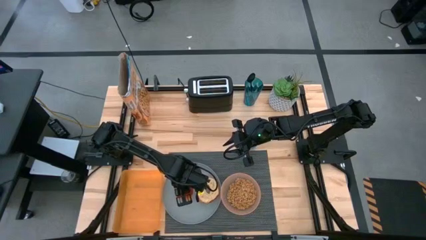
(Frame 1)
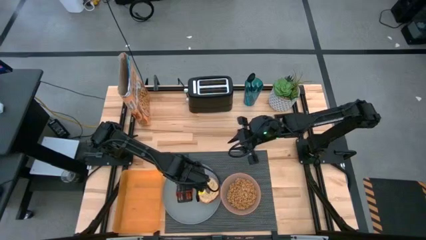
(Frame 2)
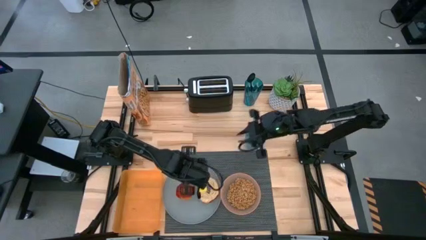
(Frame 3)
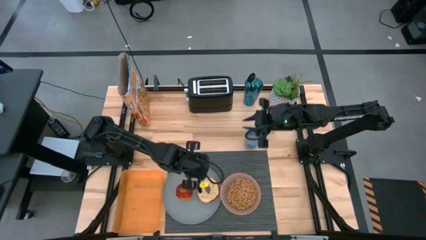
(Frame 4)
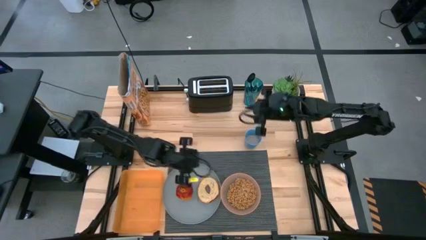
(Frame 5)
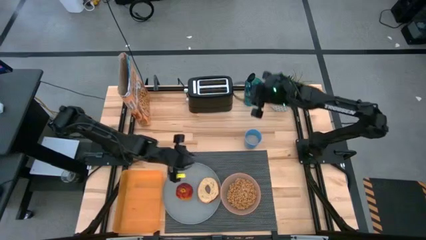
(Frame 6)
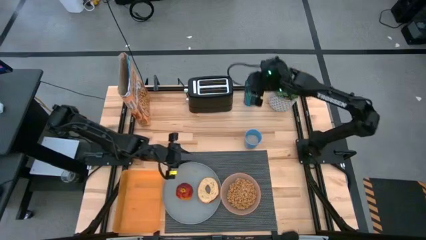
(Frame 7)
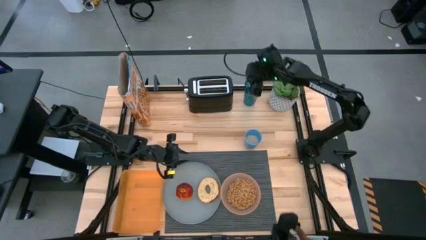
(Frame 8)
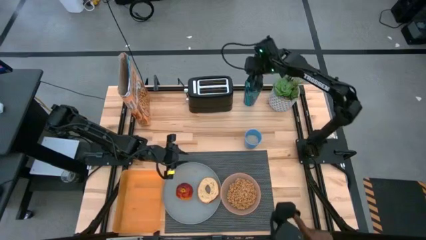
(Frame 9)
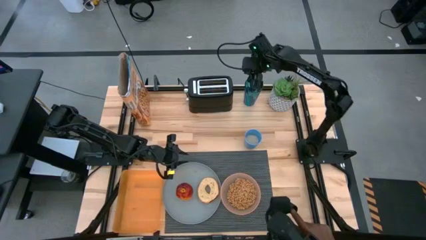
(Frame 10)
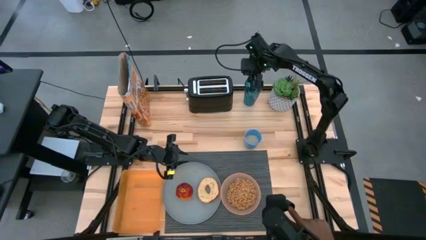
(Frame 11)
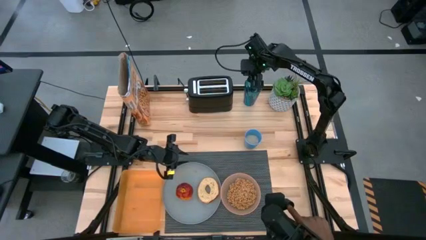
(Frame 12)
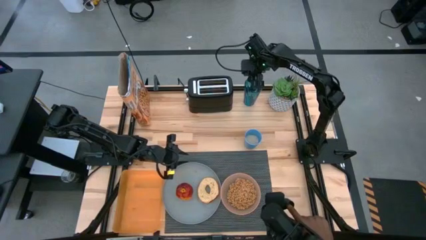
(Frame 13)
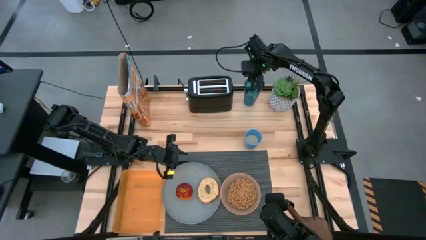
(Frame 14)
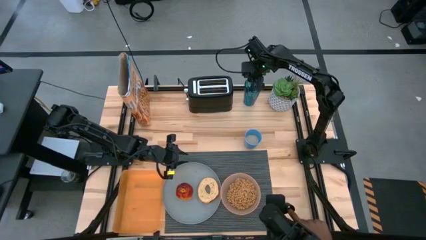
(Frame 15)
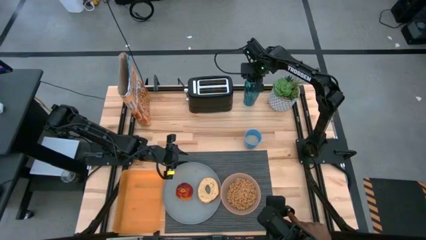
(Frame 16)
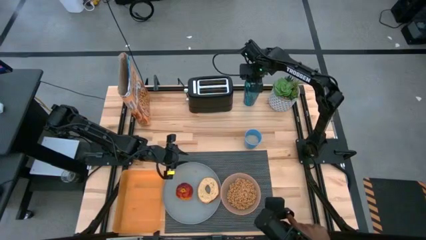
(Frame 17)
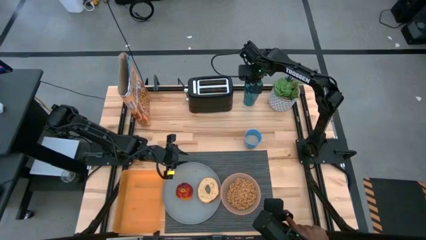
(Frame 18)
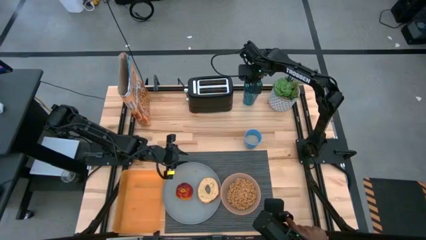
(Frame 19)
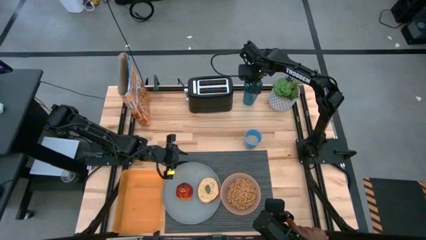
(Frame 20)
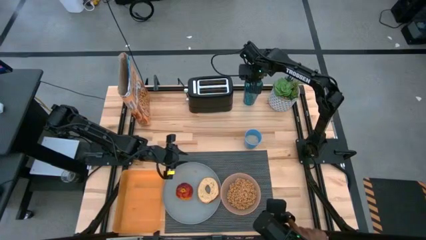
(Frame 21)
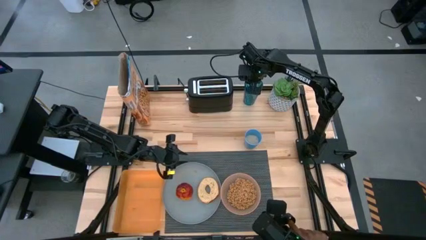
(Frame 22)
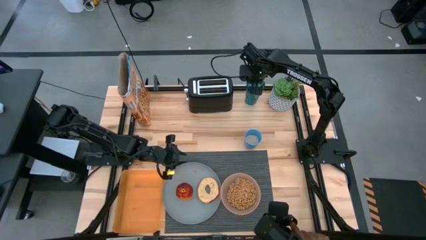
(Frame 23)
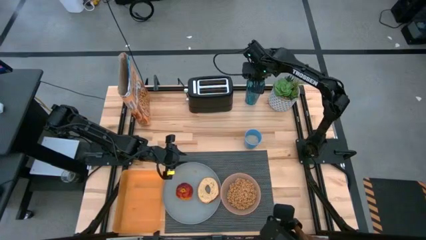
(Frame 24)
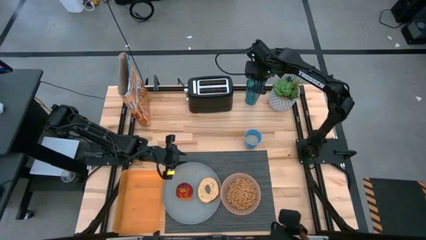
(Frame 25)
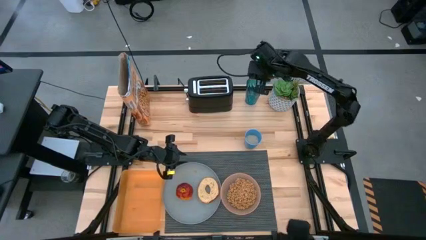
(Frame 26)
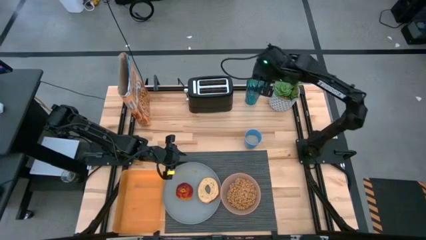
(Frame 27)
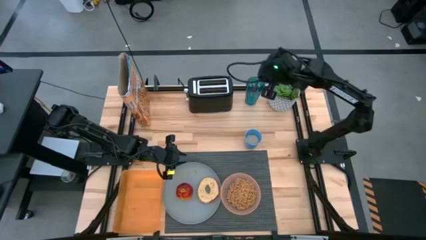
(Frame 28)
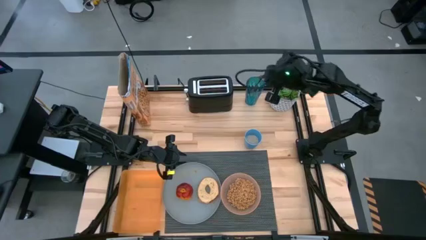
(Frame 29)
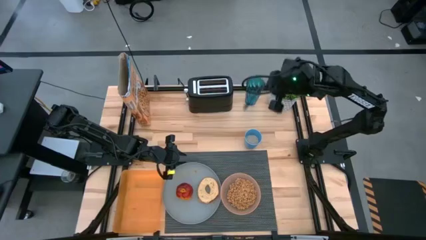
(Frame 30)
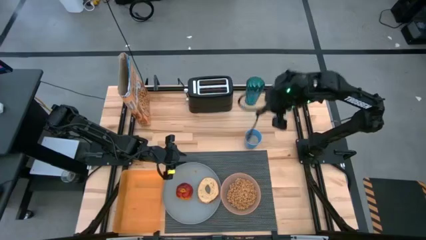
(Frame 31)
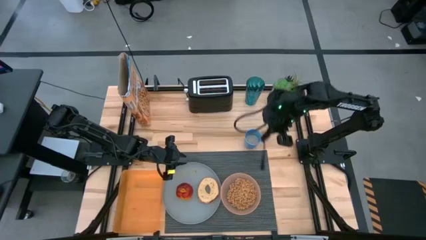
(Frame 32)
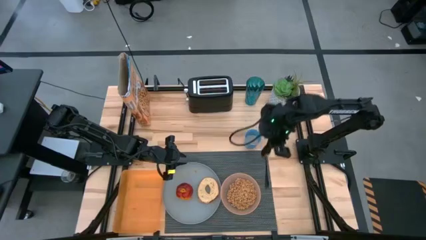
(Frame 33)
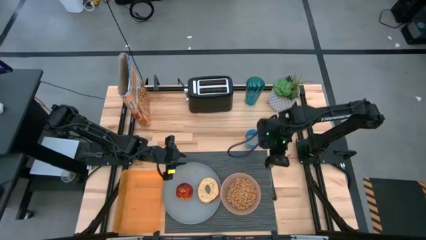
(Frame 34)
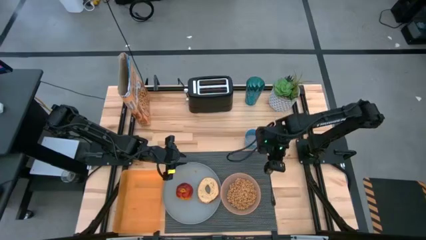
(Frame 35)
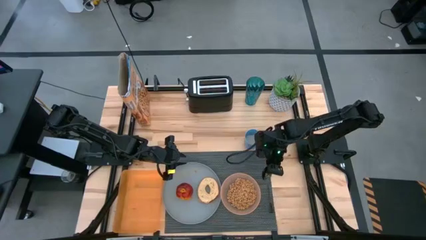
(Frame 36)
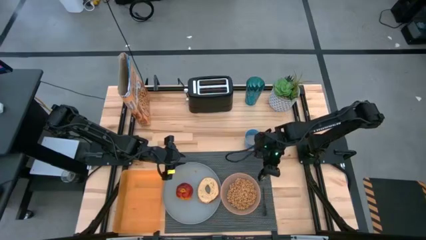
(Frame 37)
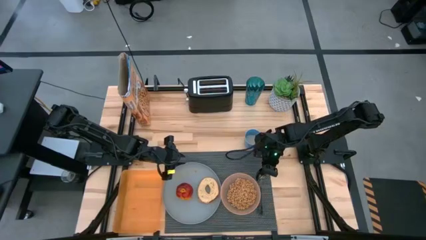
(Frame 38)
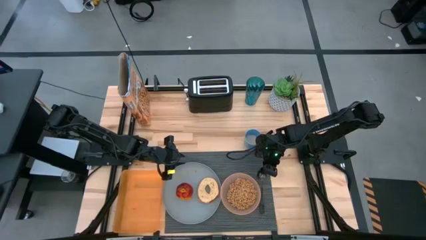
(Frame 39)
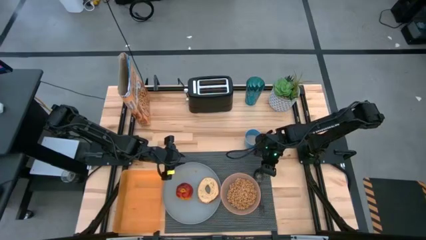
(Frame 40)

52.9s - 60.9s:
Task: Arrange a breakfast setting
Put the spoon on the right side of the pink bowl

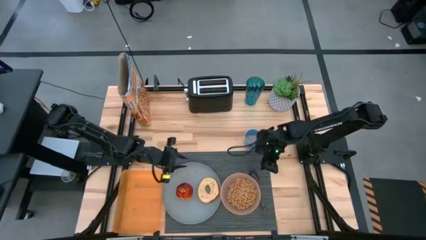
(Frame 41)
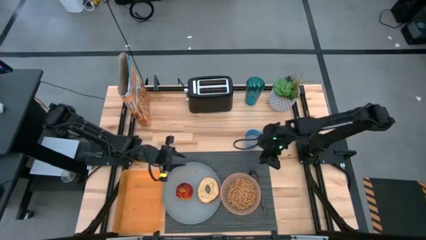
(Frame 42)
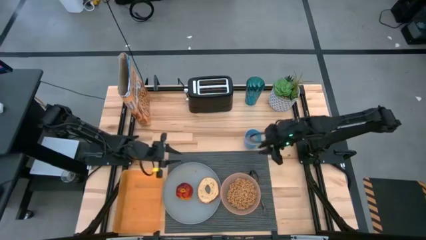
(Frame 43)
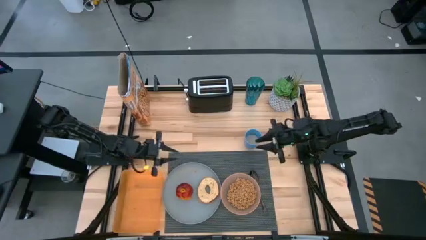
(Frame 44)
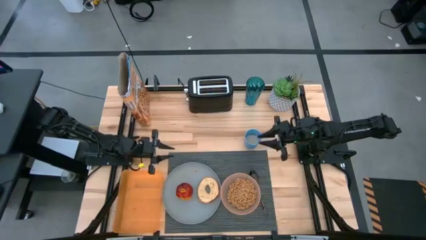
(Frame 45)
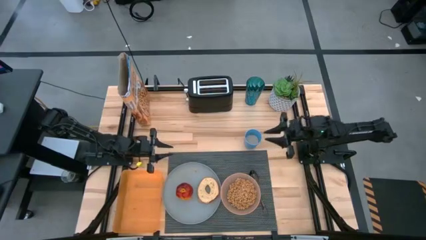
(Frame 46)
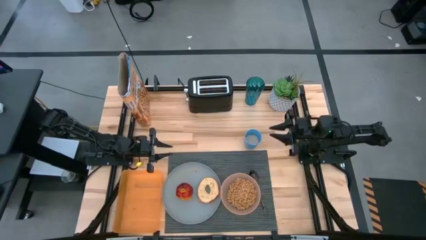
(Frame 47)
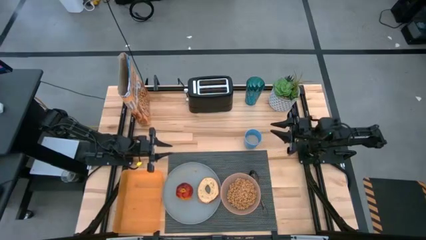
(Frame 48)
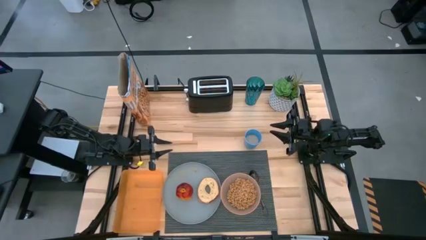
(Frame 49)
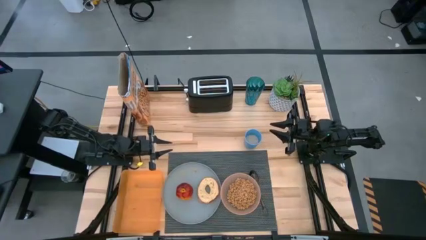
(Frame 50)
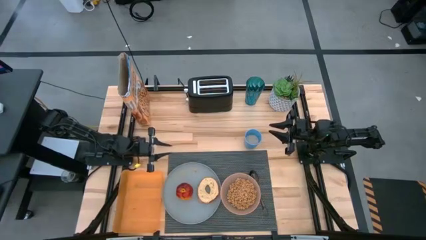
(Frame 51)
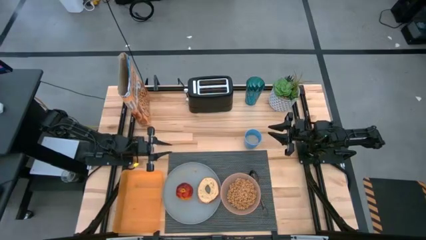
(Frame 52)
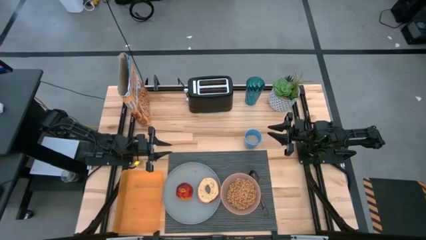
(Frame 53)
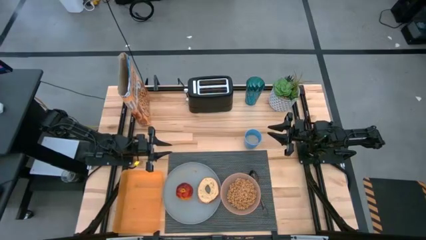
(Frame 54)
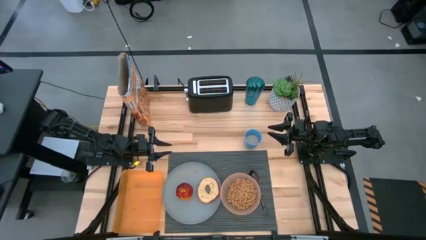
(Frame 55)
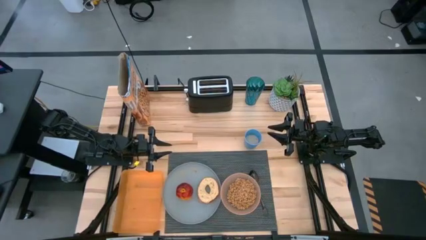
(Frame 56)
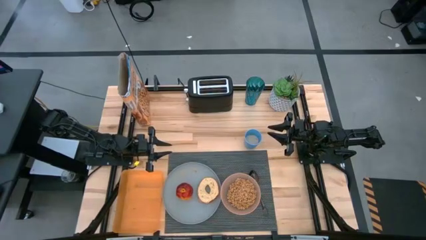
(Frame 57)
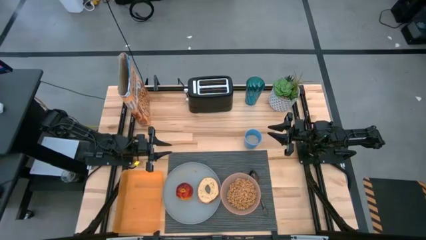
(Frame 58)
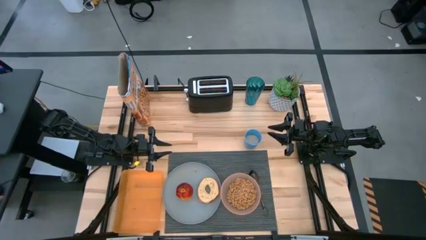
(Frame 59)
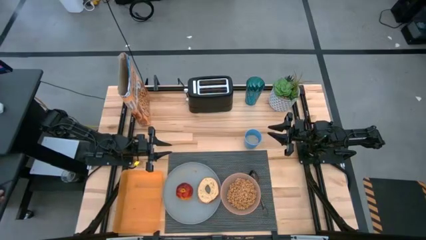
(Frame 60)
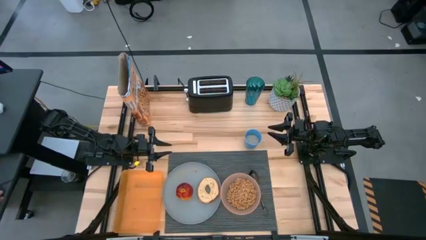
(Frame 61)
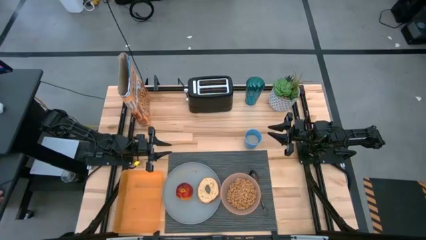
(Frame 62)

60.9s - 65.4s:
Return to Home Position

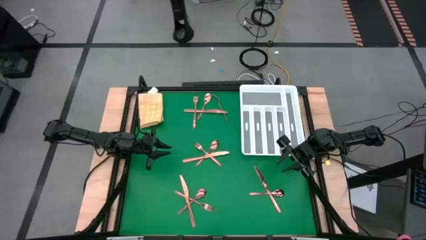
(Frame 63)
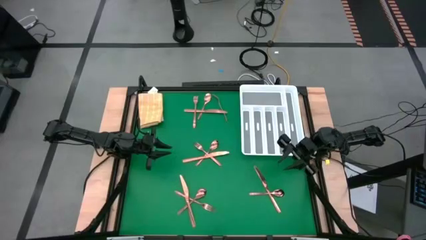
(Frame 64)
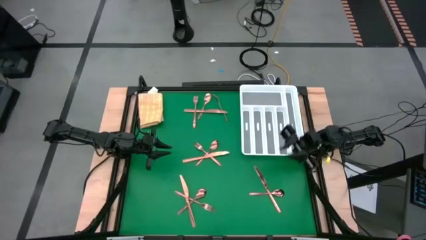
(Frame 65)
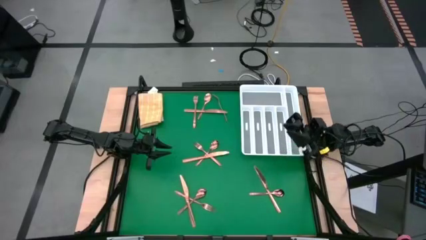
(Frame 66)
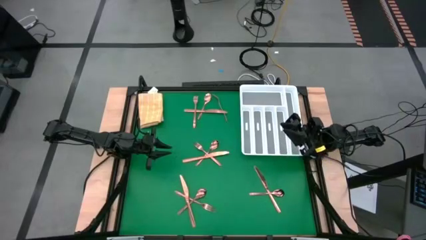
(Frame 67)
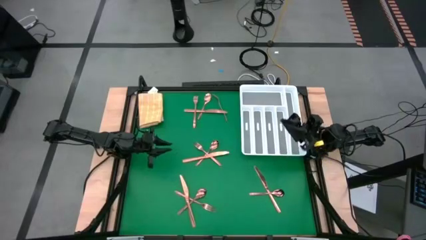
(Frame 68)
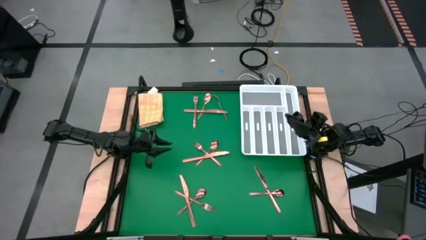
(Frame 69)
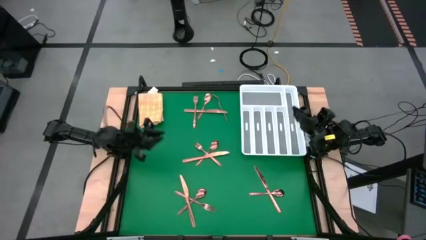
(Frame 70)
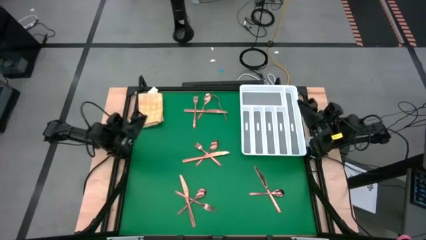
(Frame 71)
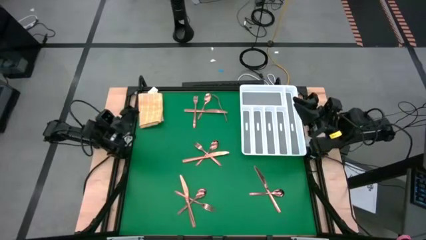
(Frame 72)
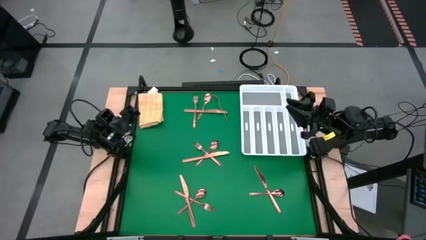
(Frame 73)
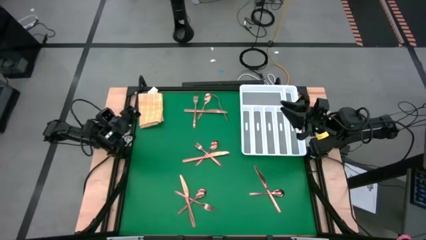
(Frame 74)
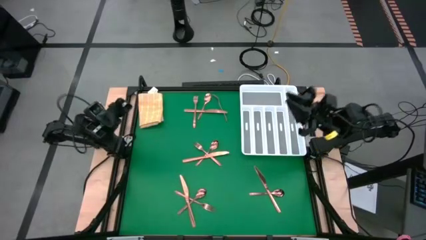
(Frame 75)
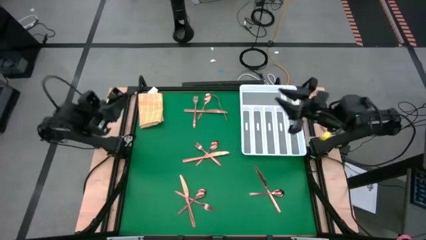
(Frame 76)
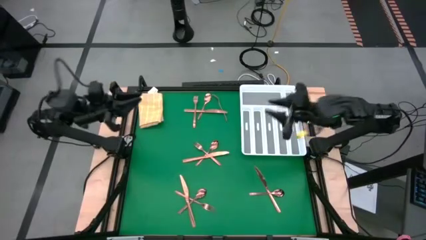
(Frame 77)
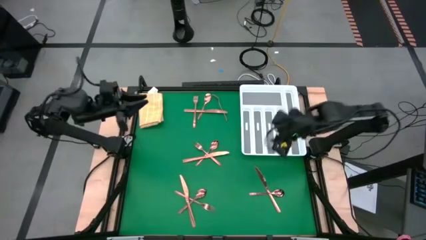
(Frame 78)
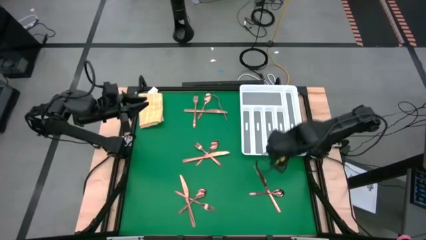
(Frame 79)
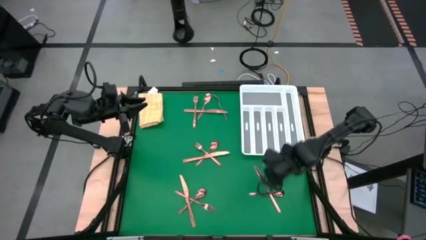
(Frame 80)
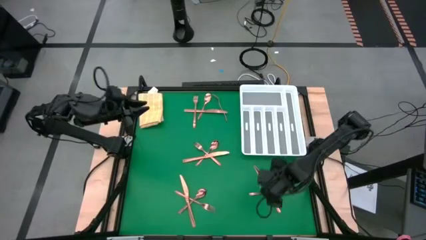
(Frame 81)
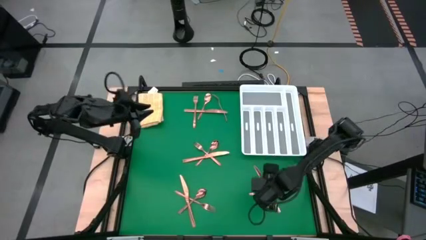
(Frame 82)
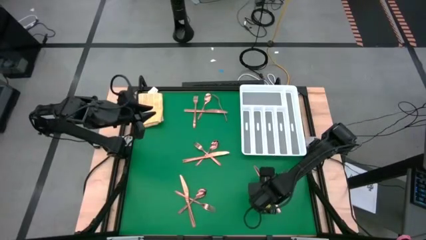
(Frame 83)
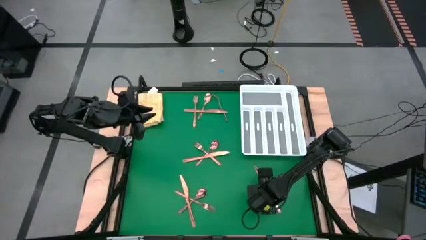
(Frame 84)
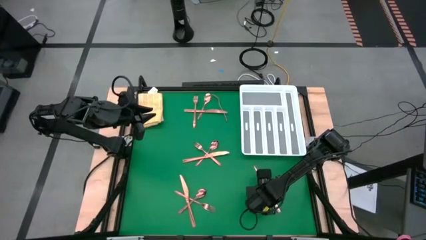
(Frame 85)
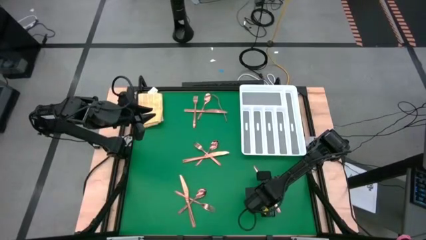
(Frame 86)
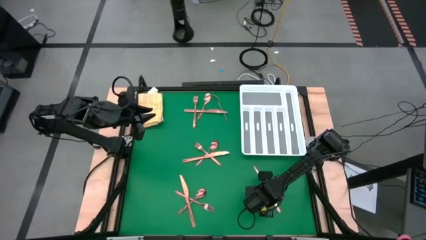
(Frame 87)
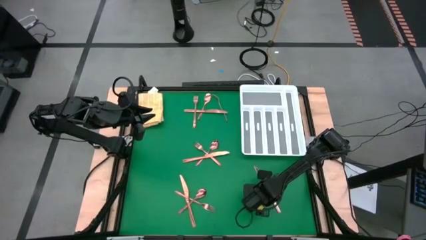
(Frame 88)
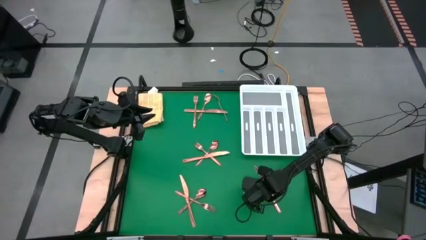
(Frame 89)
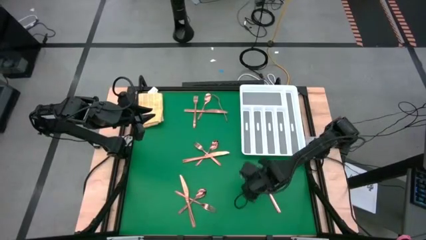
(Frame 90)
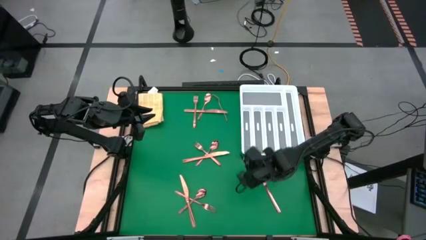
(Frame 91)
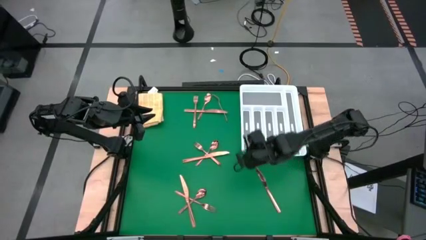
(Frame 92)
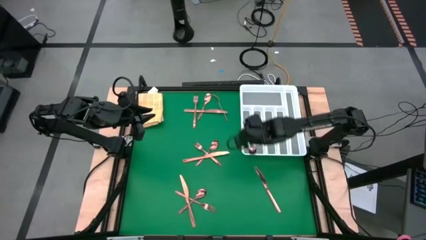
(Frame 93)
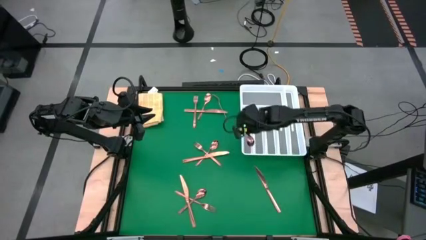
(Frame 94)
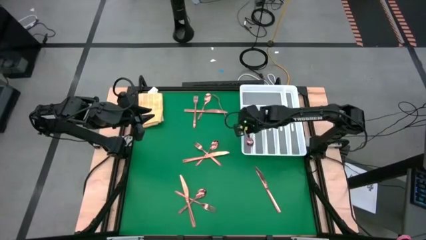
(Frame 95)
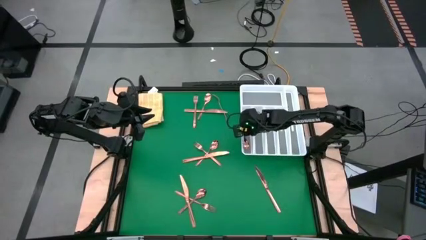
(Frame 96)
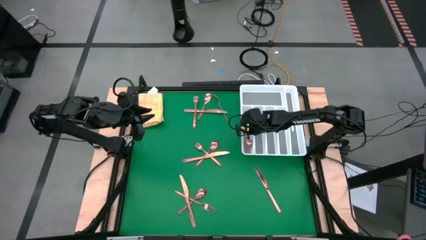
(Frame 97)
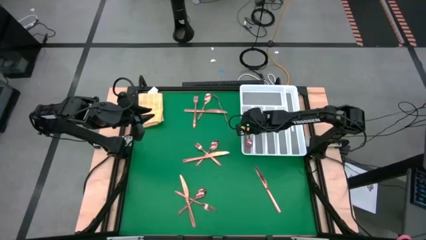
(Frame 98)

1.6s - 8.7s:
Task: Sort silverware
Put the bottom right gold spoon into the silverware organizer
